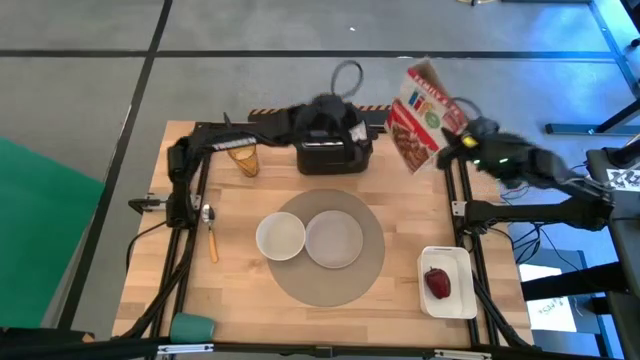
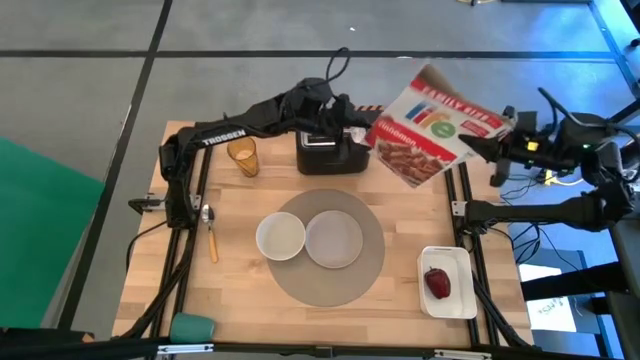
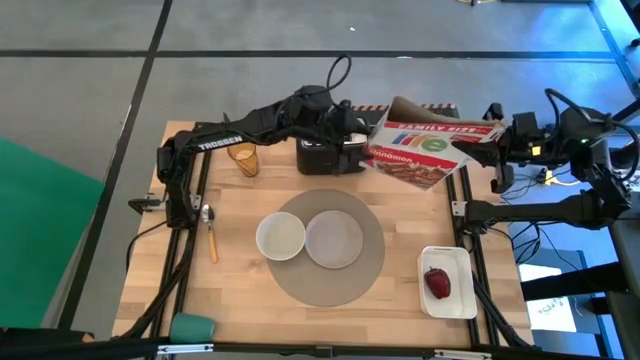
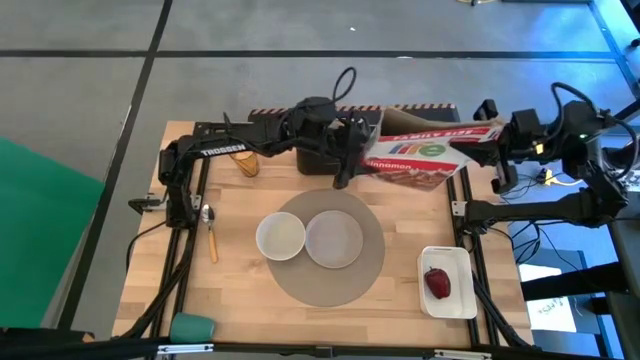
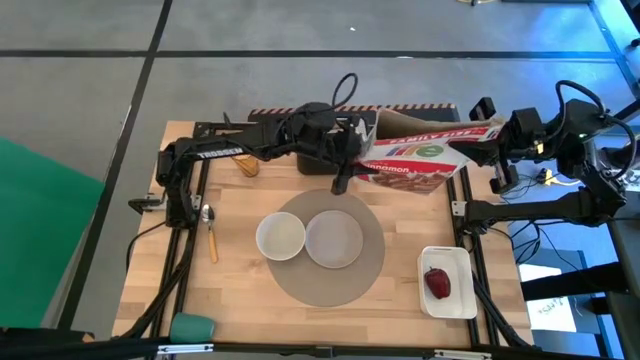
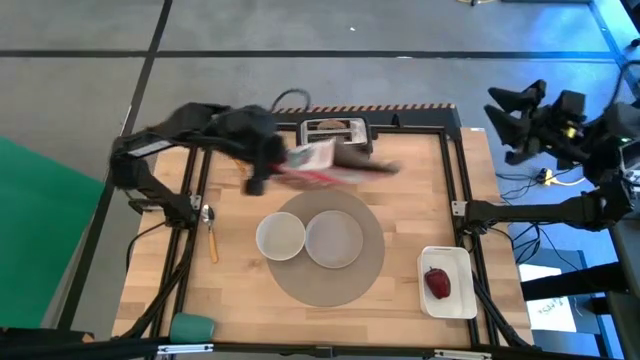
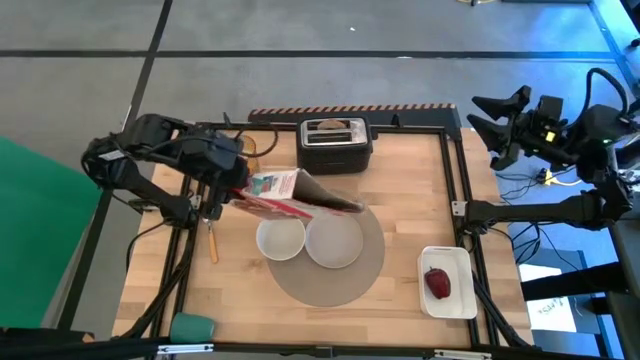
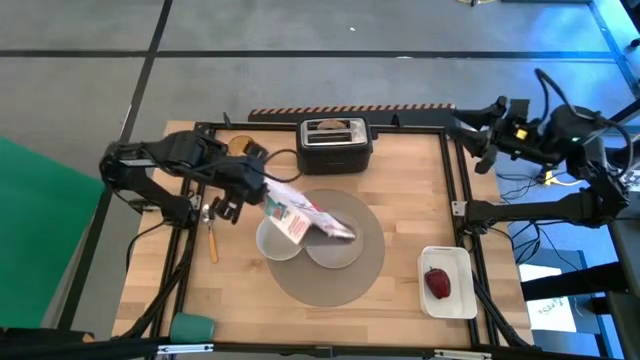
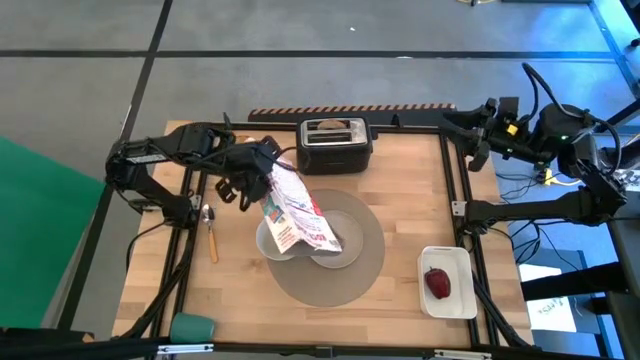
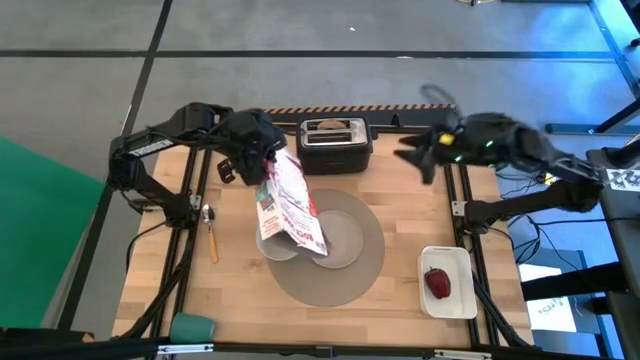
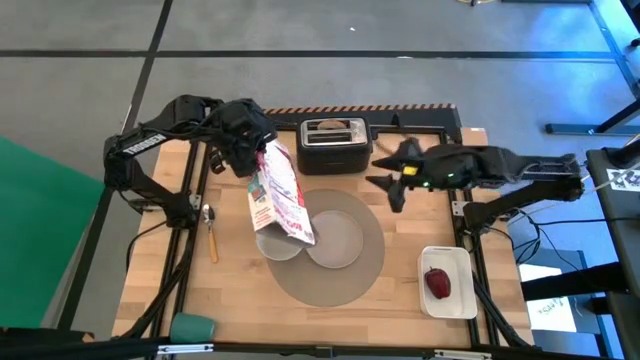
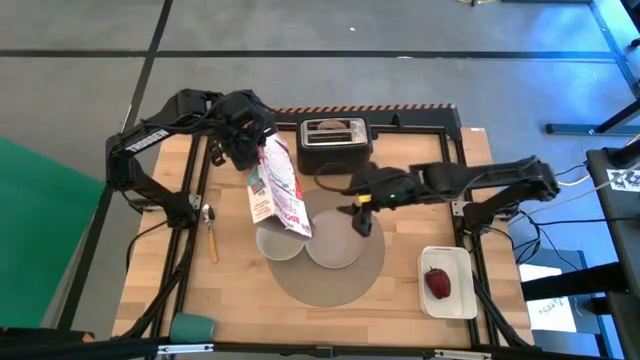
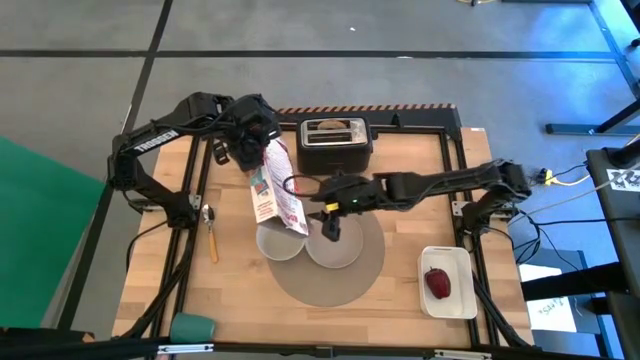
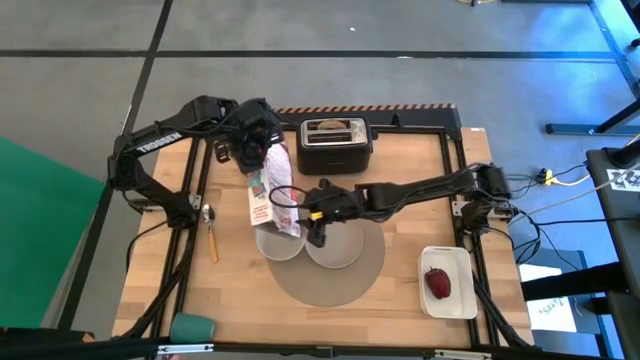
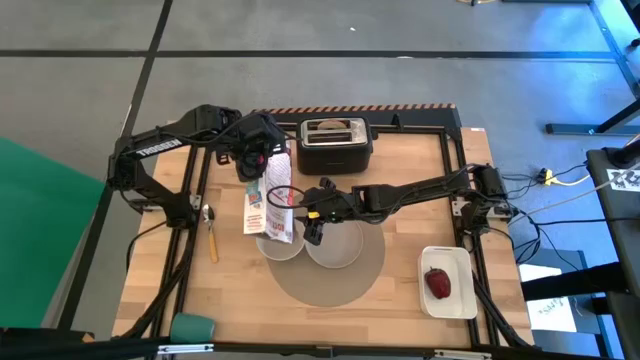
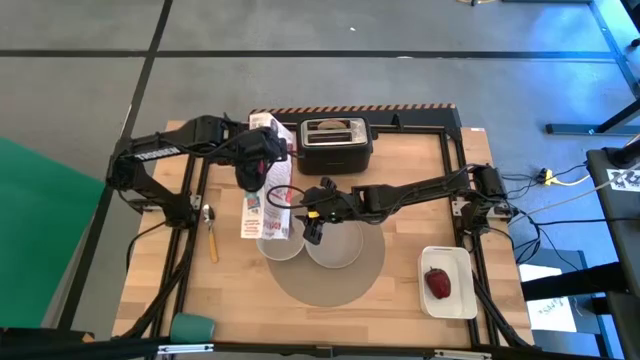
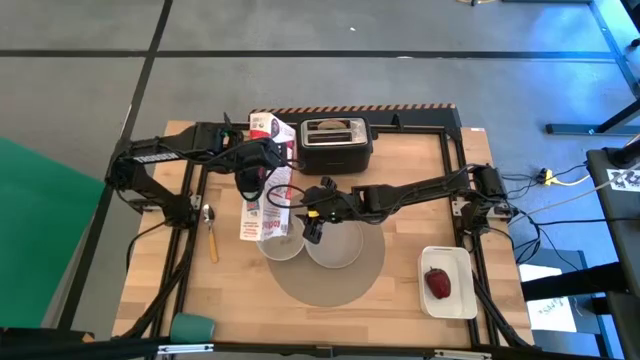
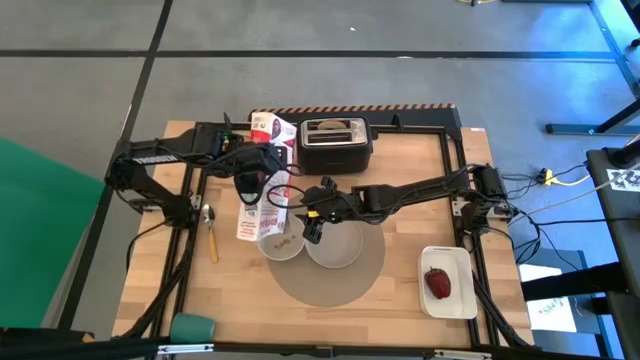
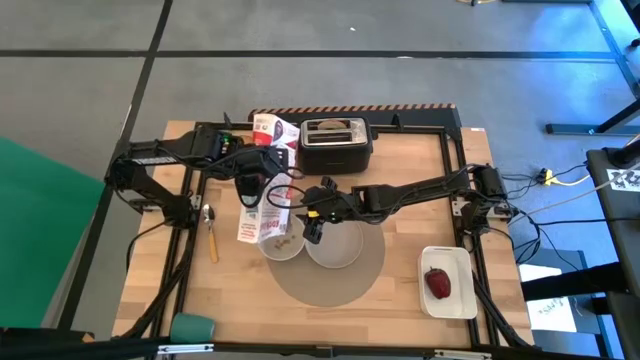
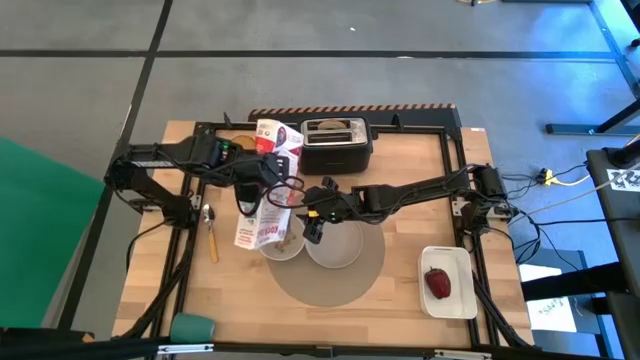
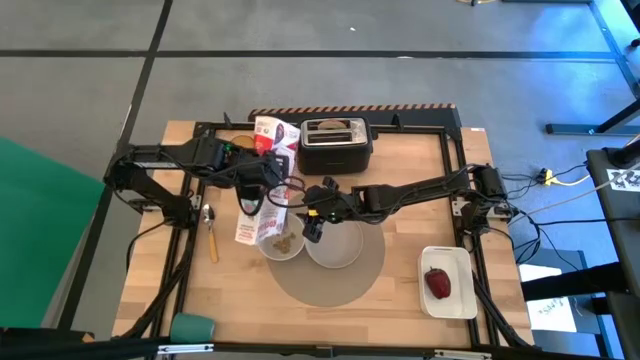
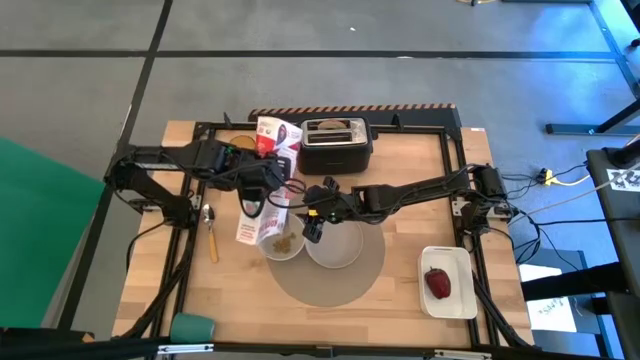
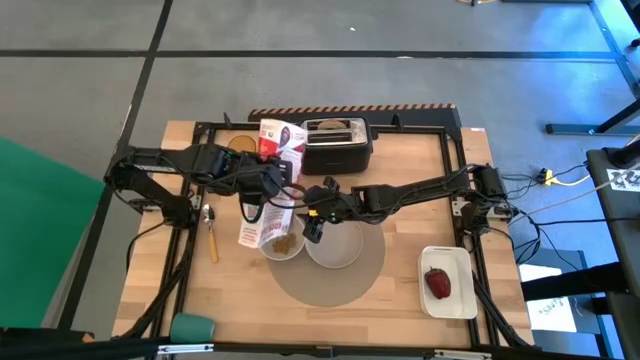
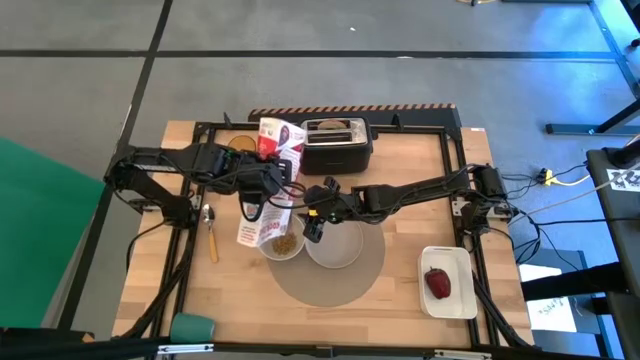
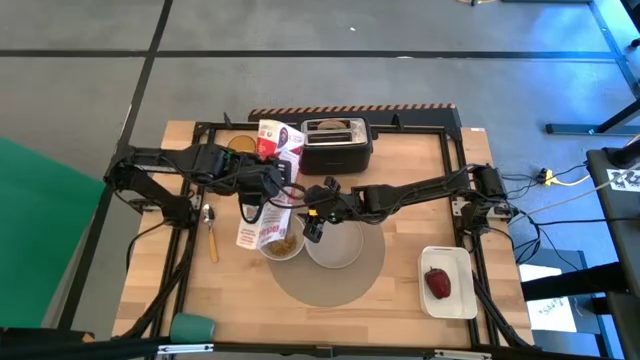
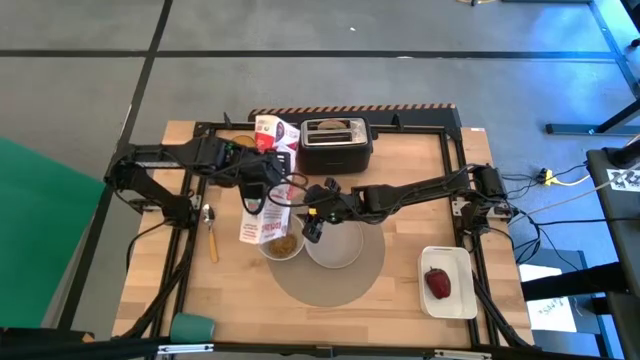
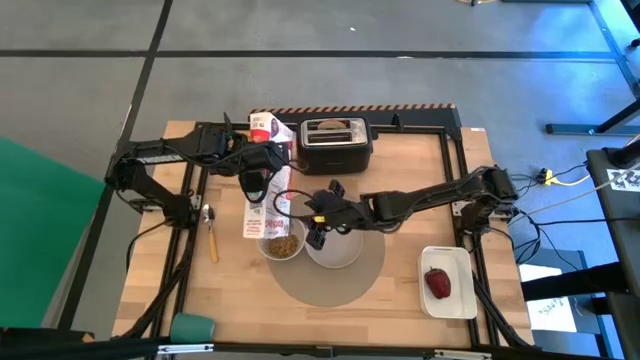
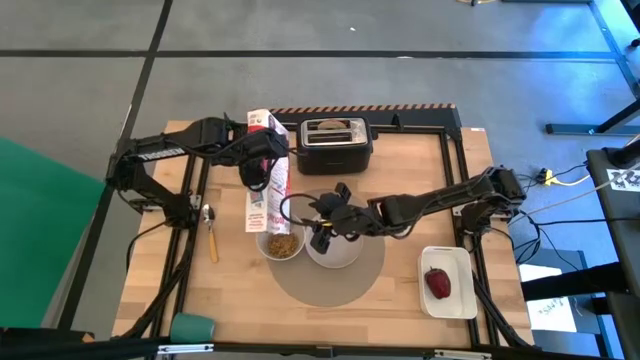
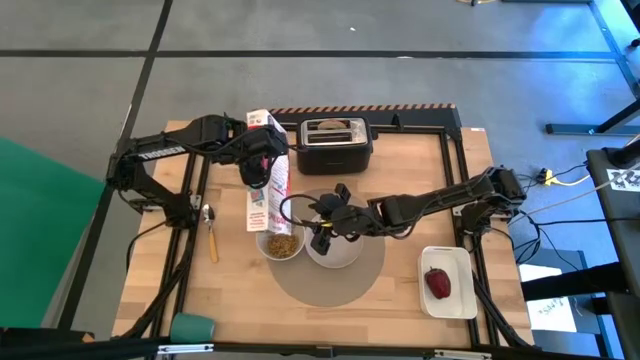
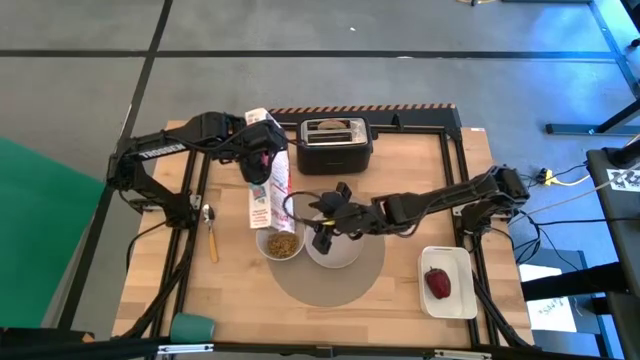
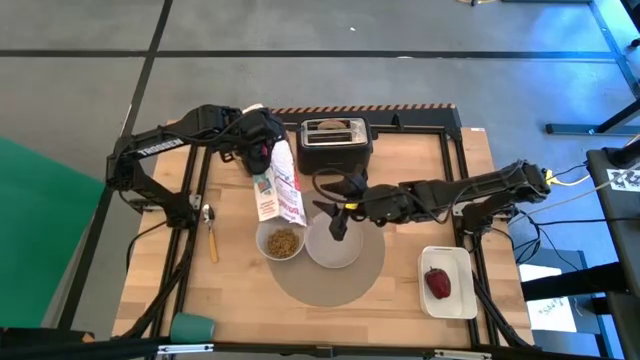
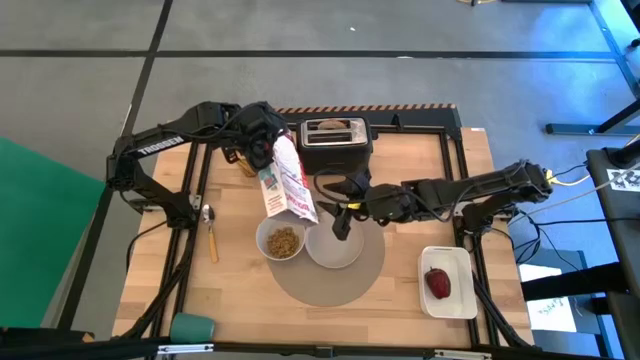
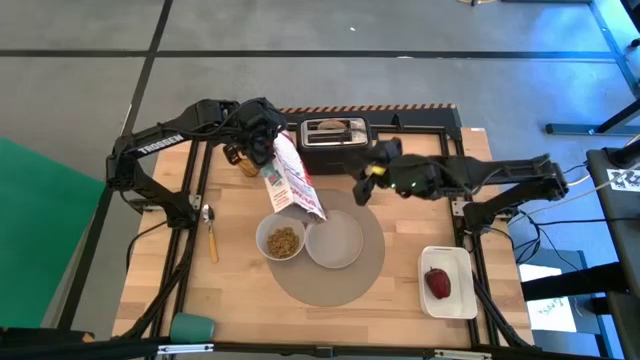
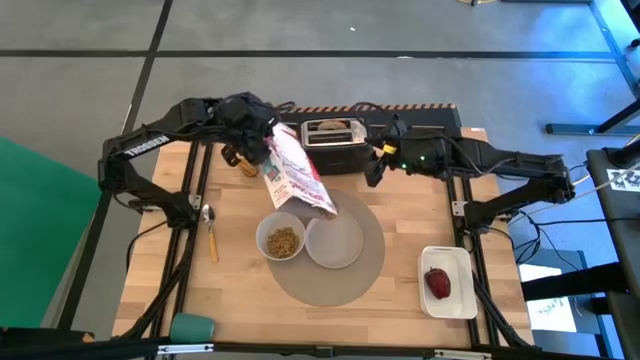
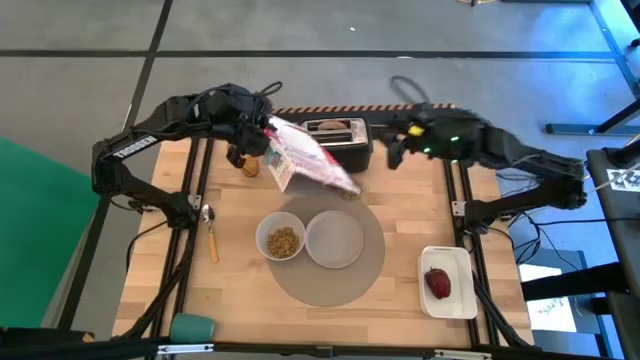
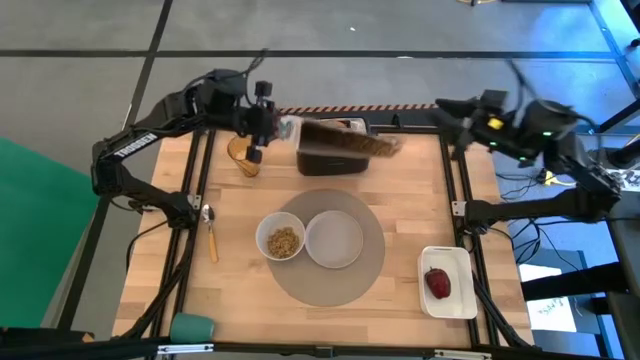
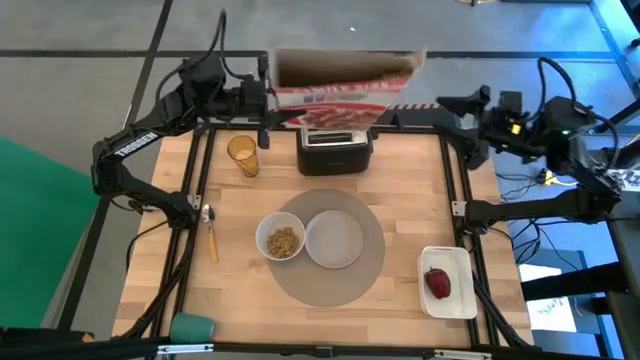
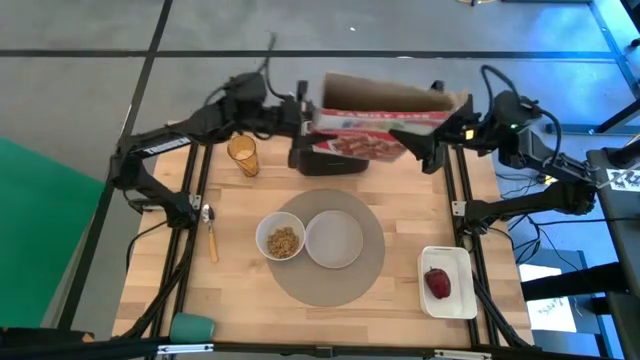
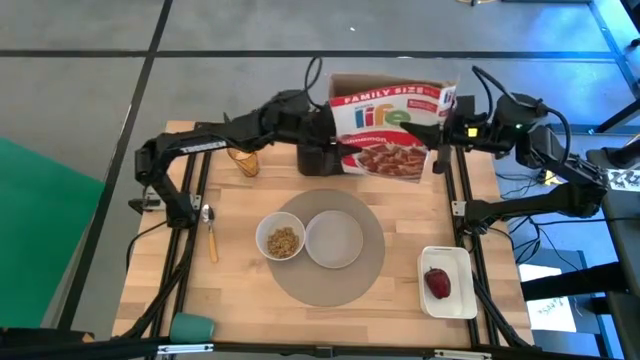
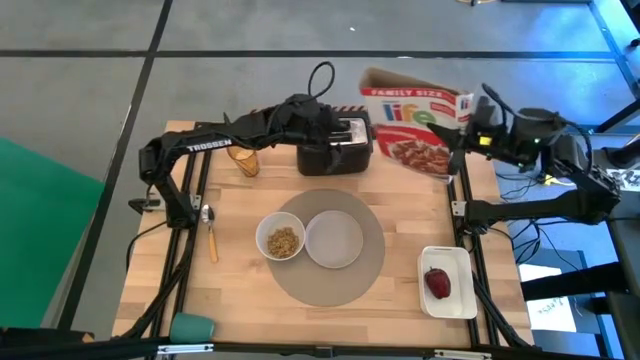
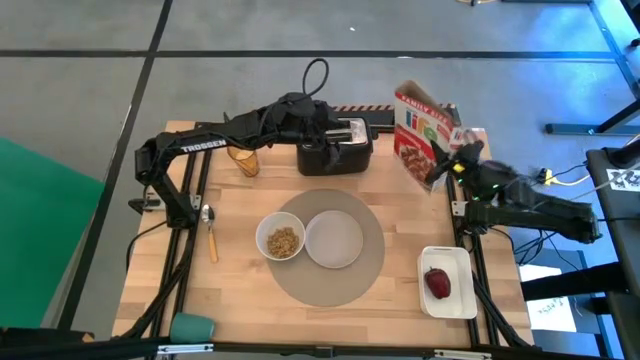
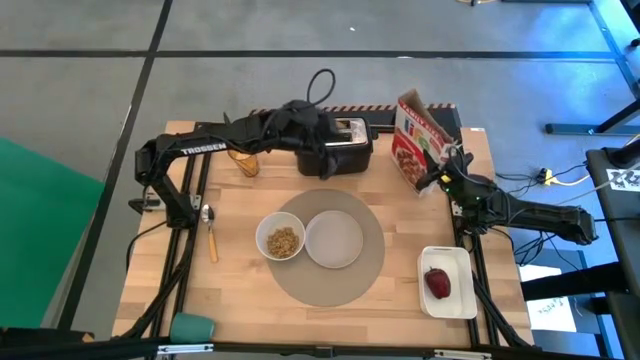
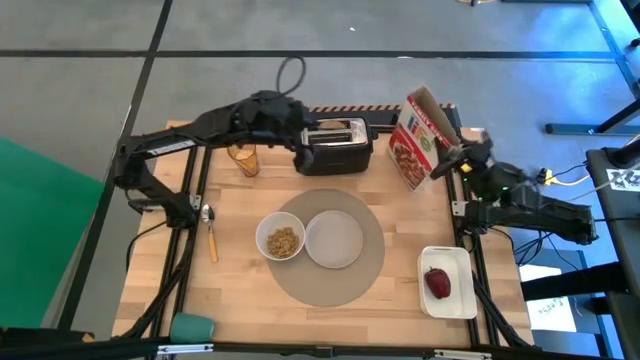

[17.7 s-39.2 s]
Task: Arrange a breakfast setting
Pour the cereal from the cereal box into the white bowl
